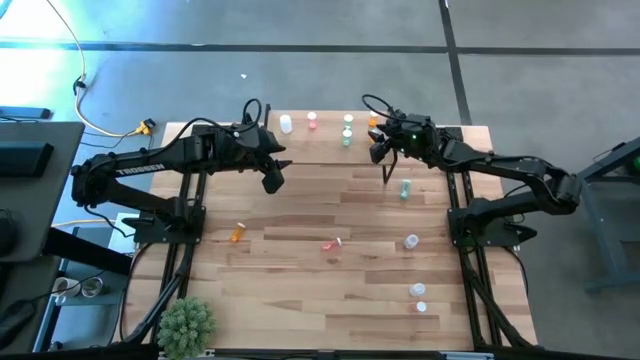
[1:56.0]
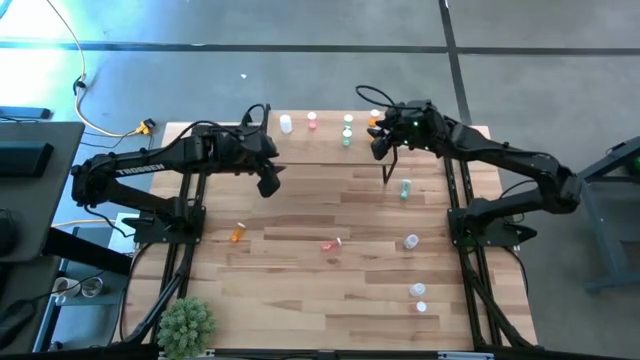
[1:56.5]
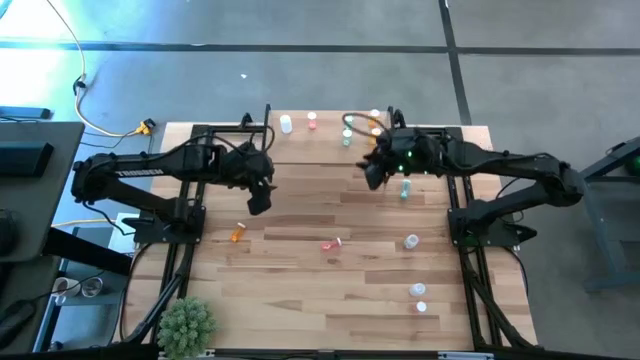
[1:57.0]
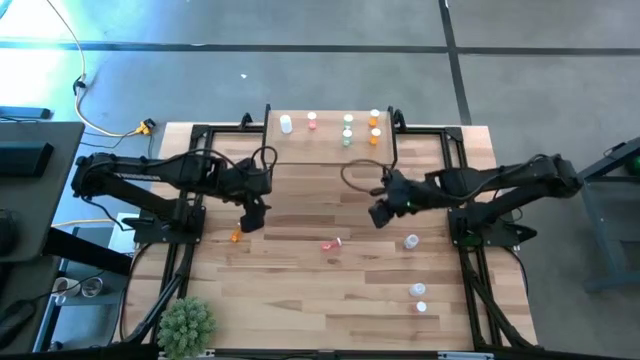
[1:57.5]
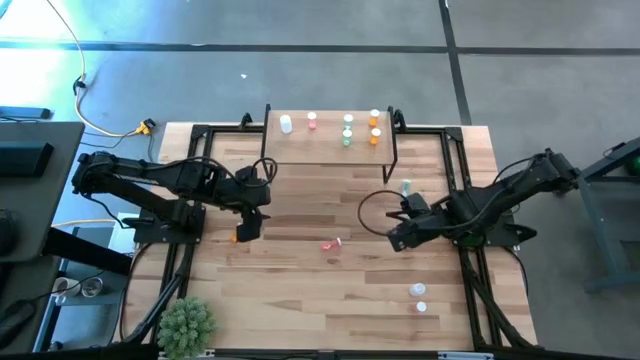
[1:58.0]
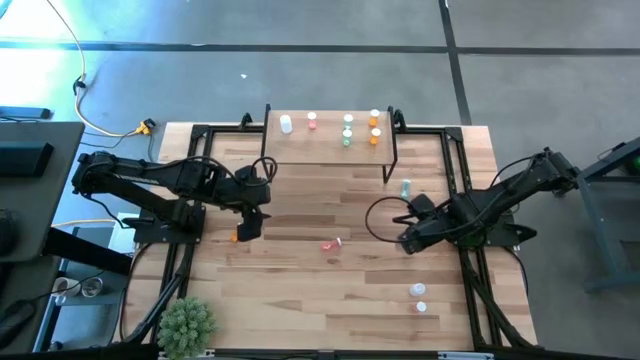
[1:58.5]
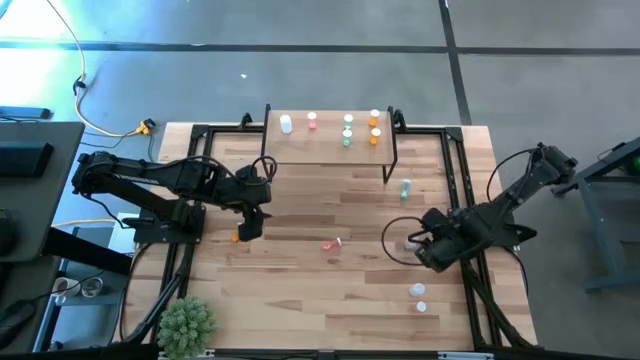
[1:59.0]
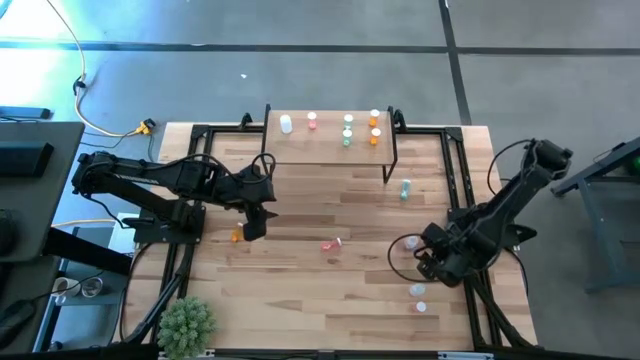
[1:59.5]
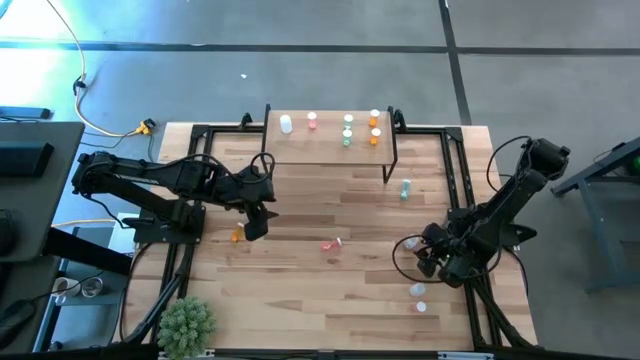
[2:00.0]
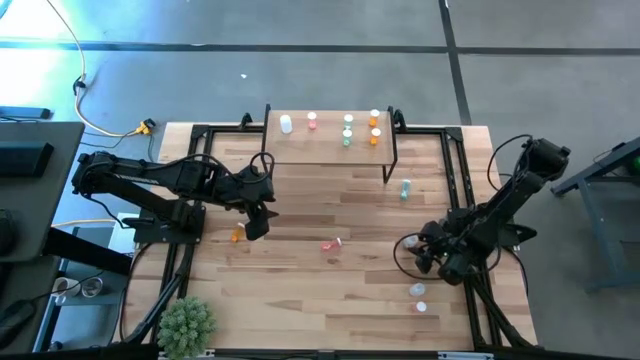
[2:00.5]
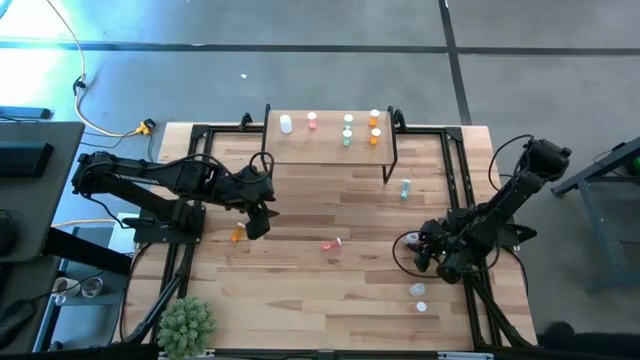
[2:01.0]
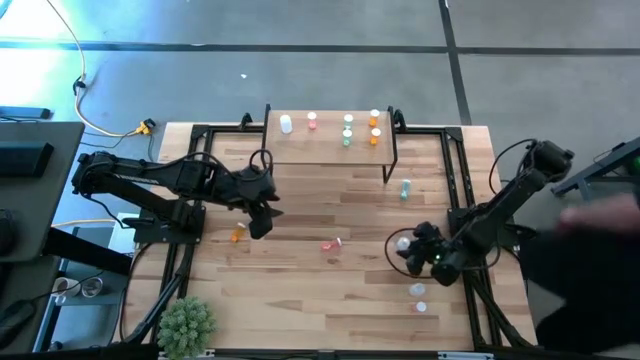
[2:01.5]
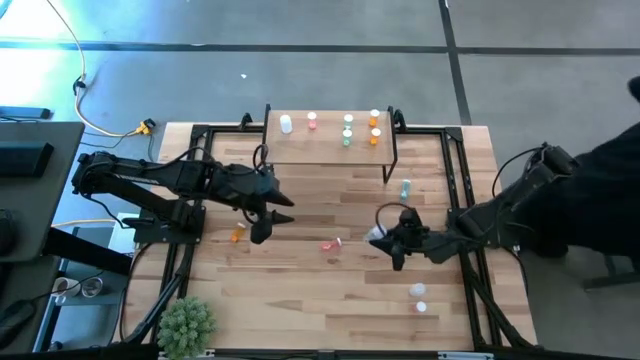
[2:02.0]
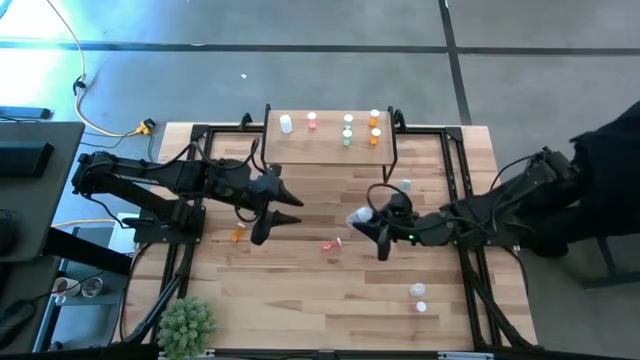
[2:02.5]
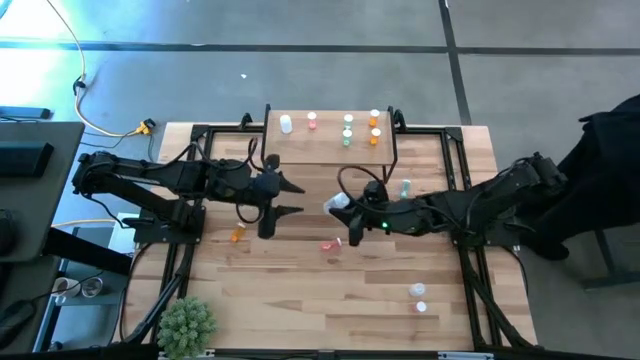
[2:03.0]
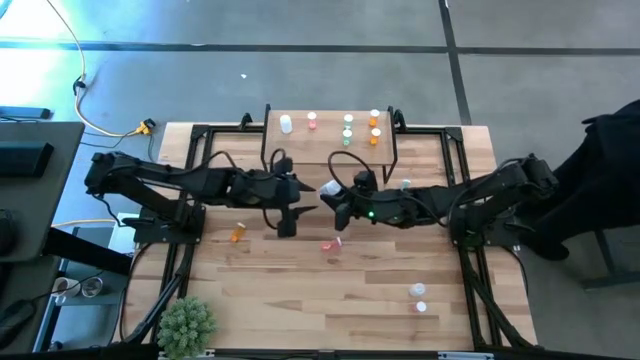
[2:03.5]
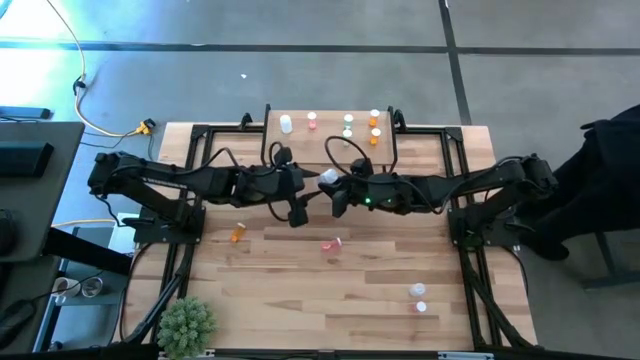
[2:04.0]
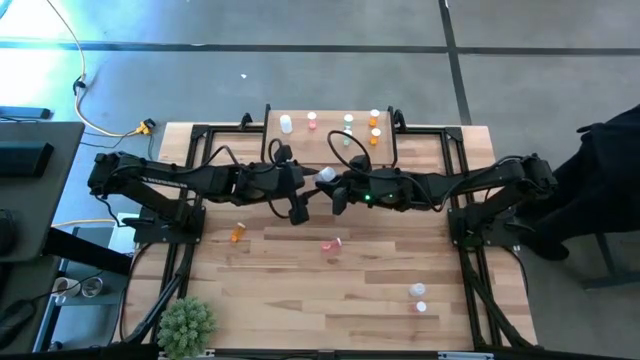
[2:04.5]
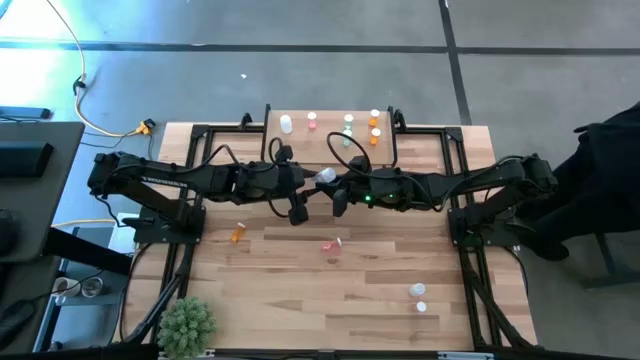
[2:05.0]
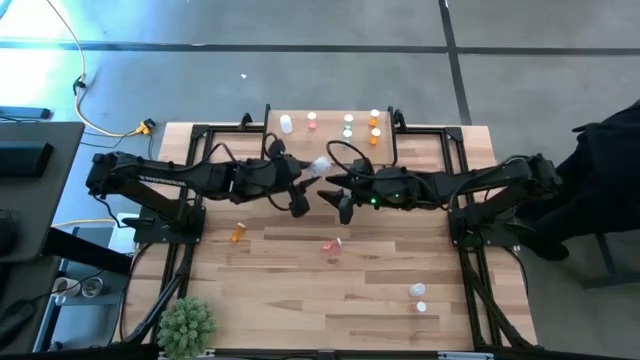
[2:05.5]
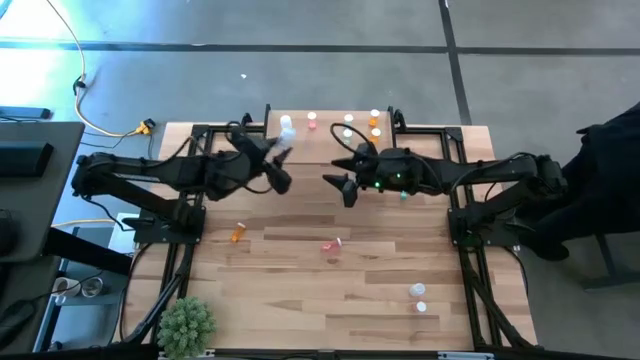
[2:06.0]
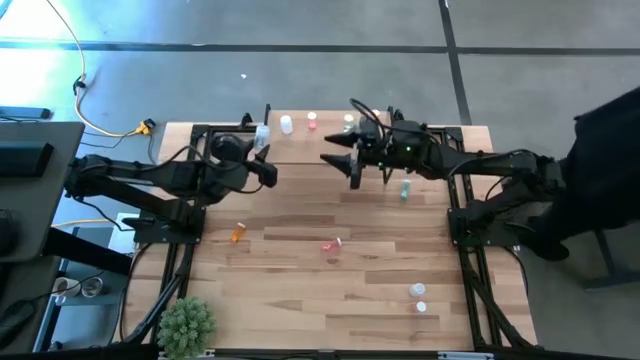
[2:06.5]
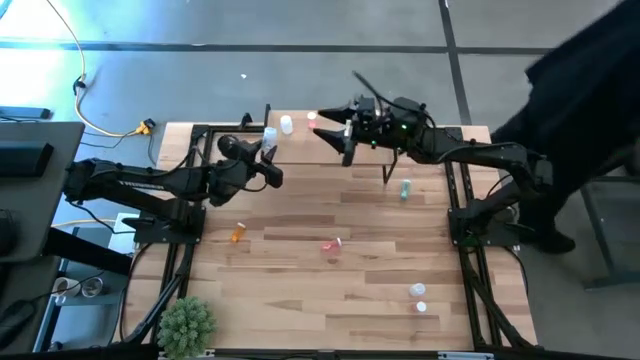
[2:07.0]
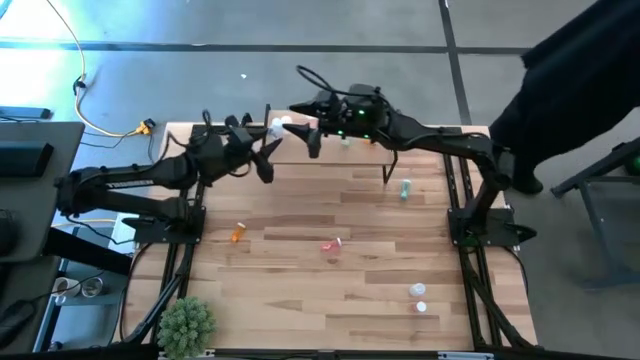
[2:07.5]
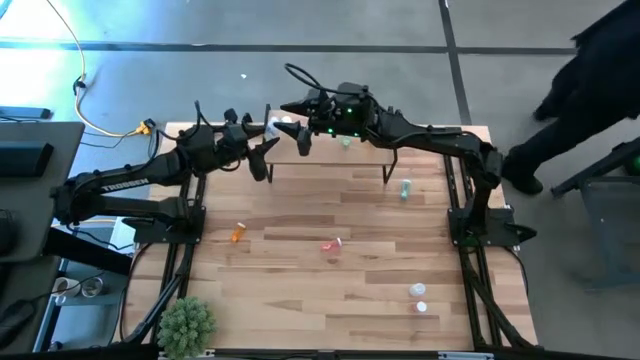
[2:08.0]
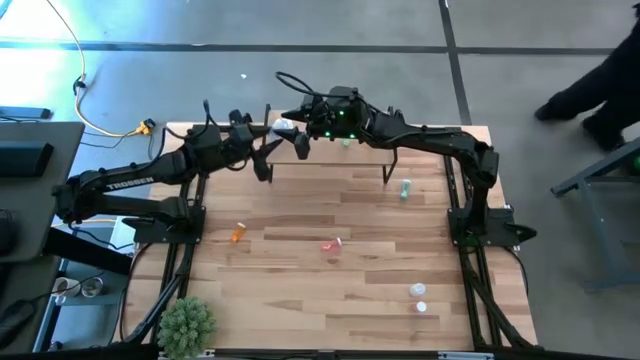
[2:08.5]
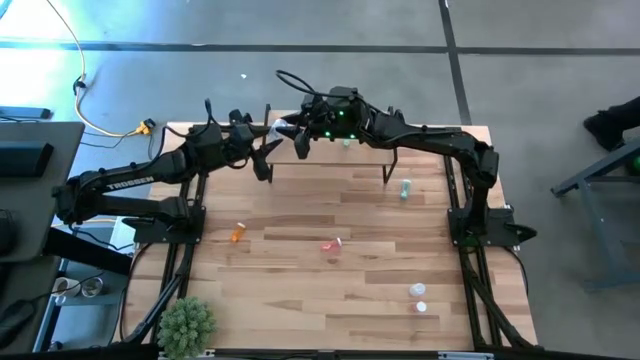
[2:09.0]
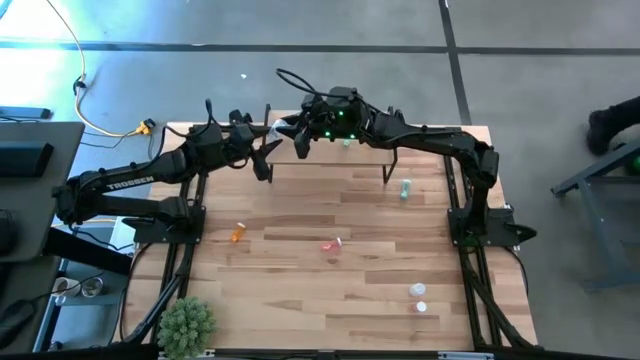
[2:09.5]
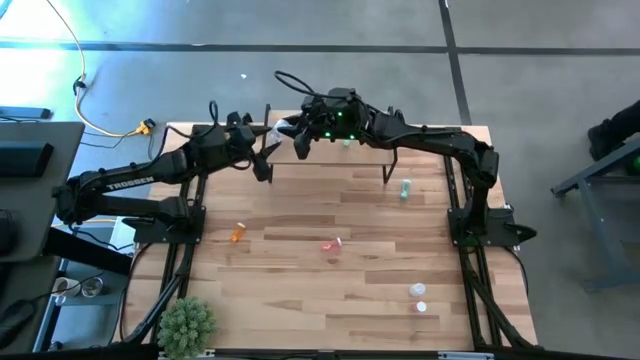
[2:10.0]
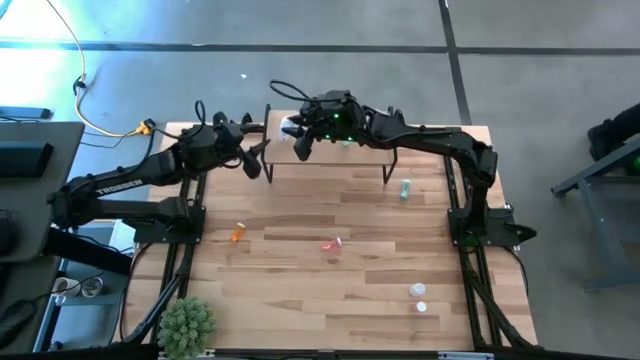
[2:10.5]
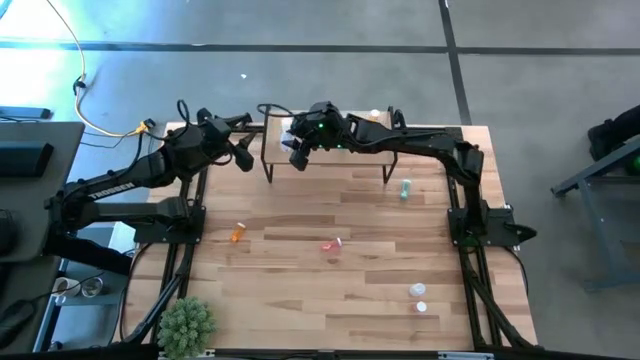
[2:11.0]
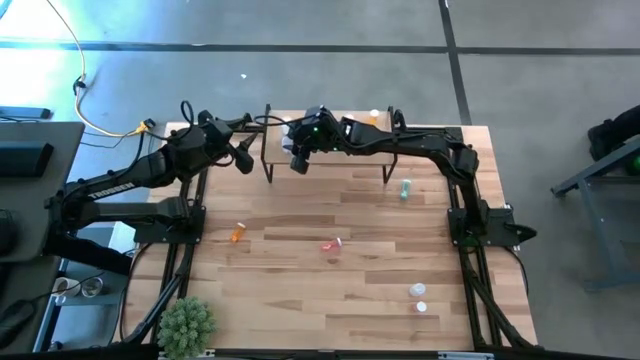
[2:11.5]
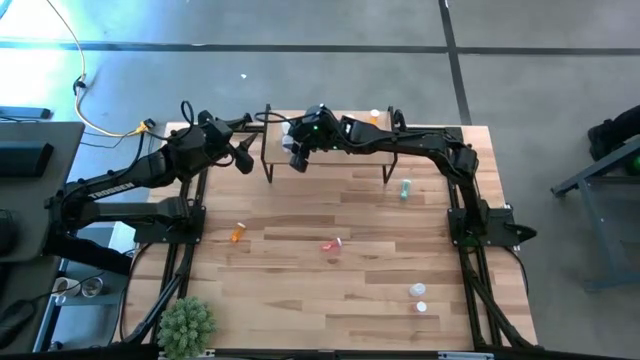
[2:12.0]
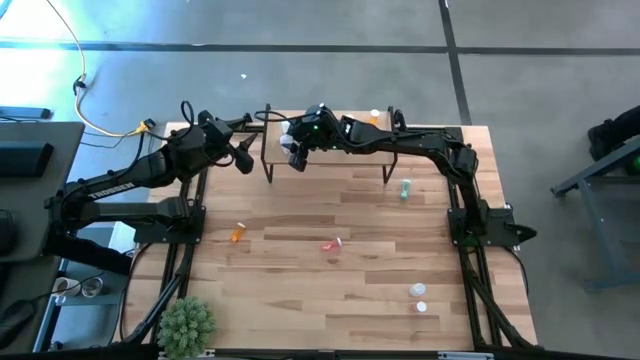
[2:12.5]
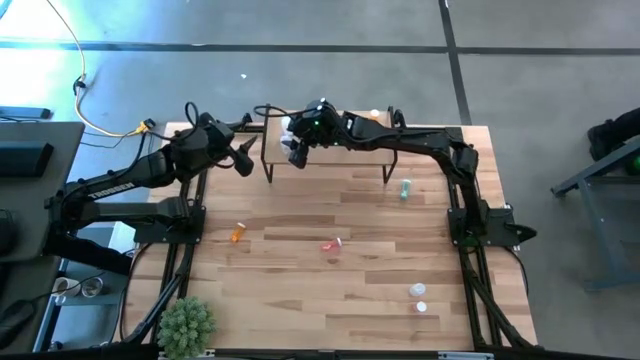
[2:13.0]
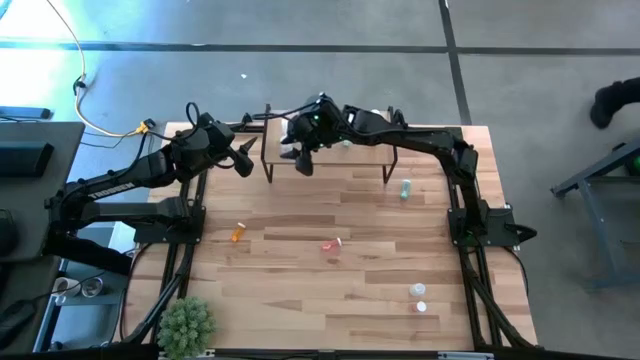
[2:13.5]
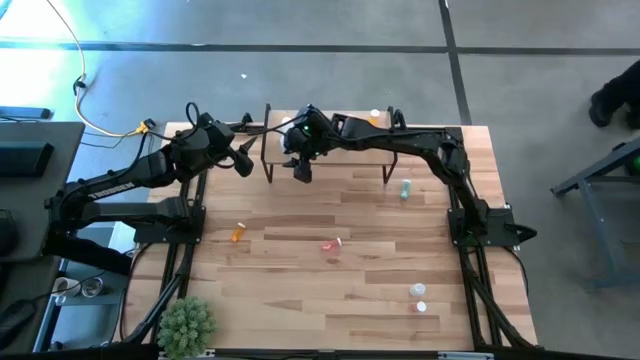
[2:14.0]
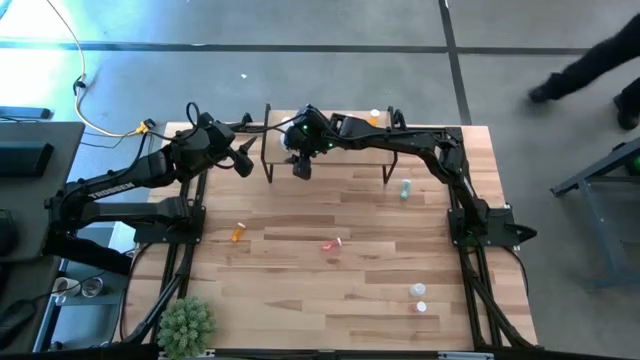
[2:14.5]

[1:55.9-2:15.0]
Task: Pick and place medicine bottles onto shelf by color
Put the top white pill bottle on the shelf aligned with the other white pill bottle

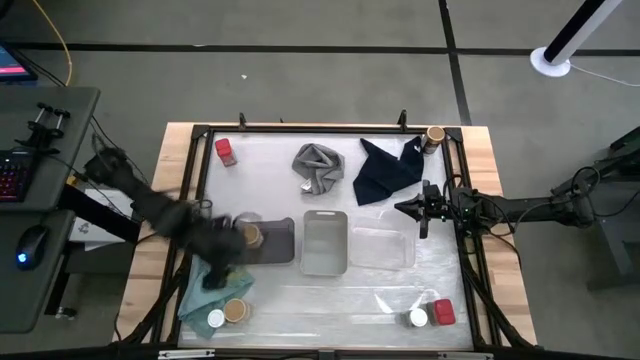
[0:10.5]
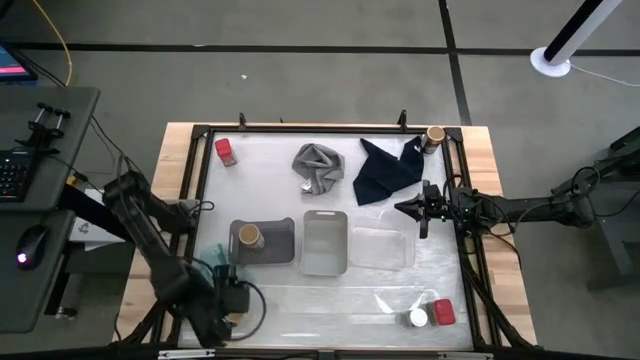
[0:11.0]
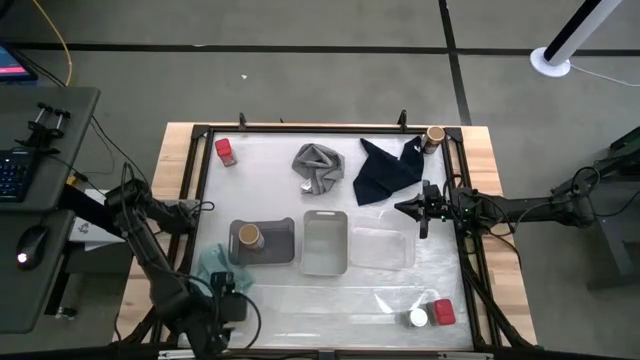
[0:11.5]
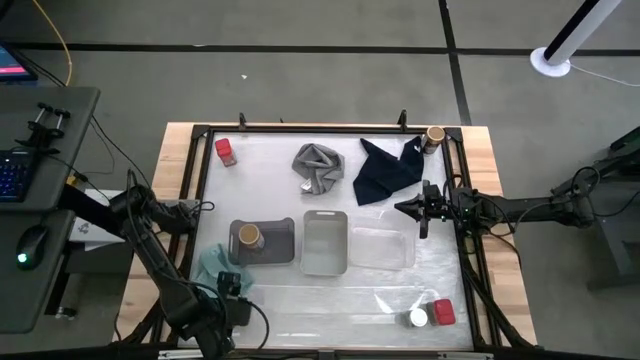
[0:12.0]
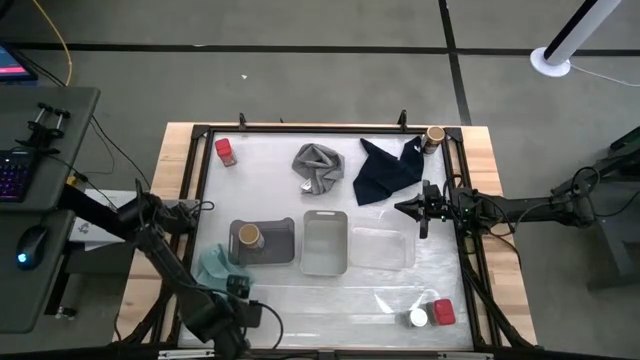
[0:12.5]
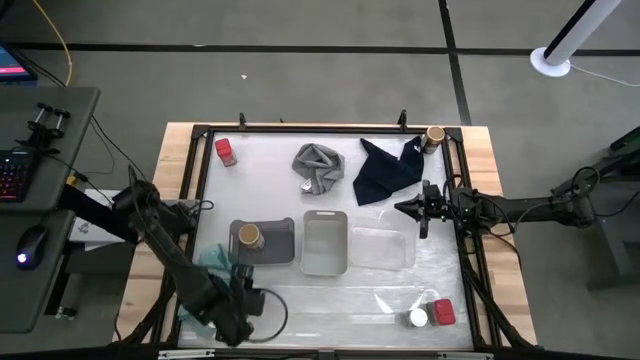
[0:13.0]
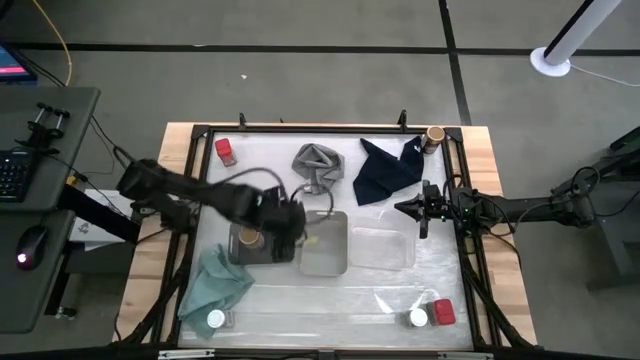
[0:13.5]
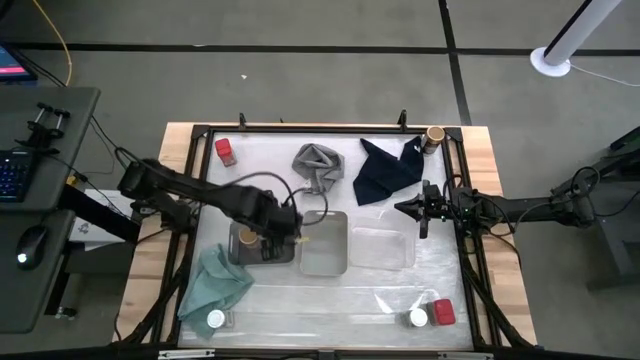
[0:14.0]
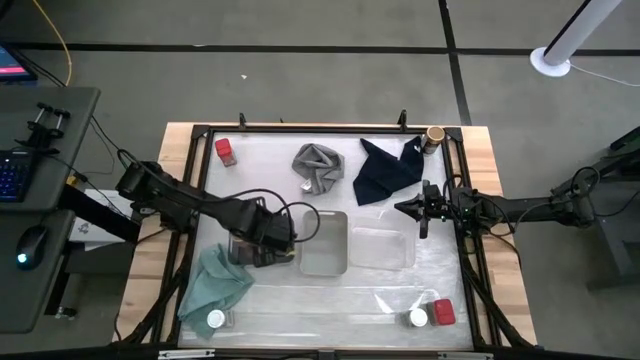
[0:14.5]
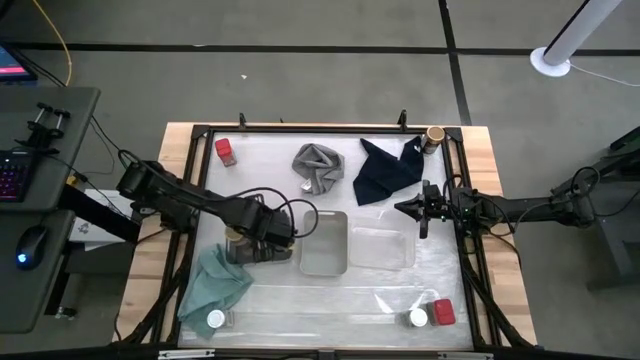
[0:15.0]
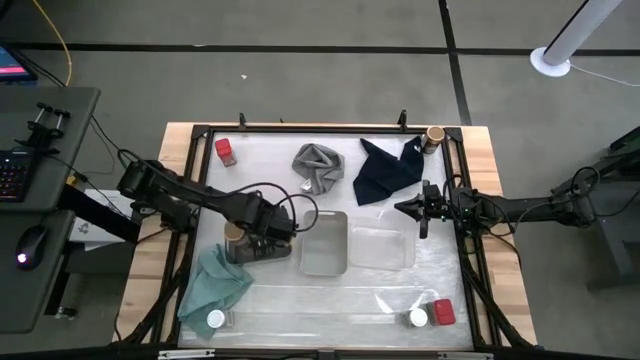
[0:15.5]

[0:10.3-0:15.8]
Task: Sort spices by type
Put the bottom gold seasoning bottle into the black bin
